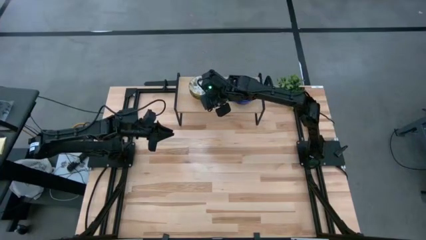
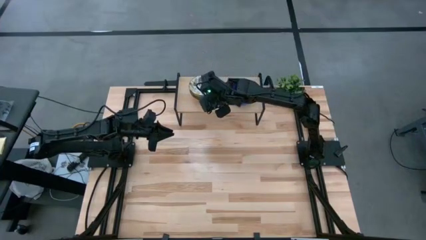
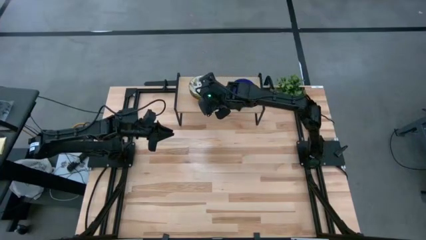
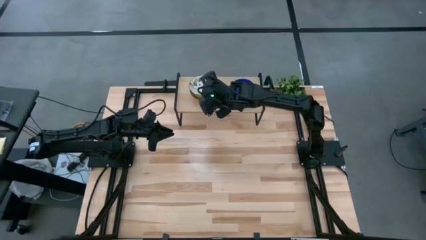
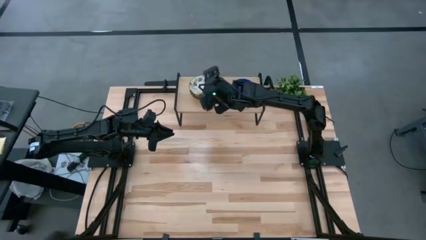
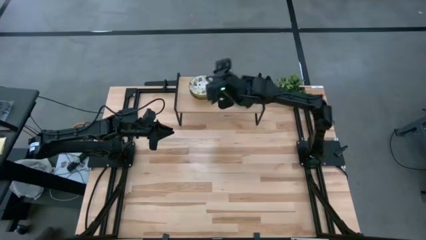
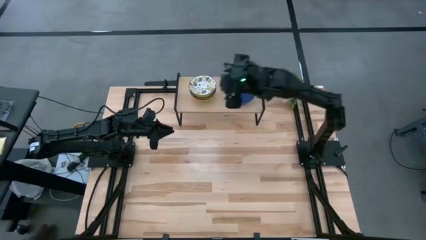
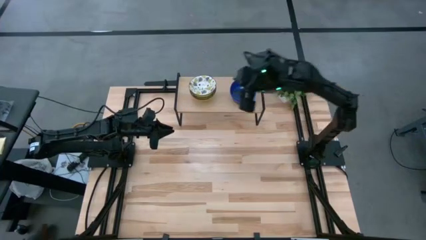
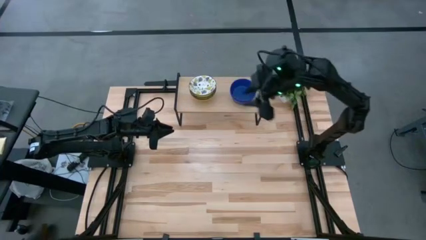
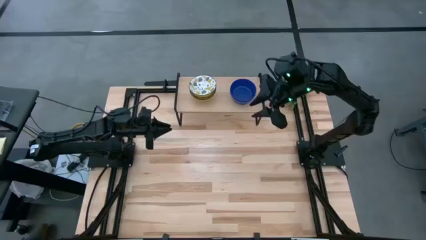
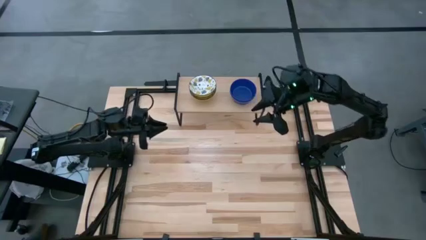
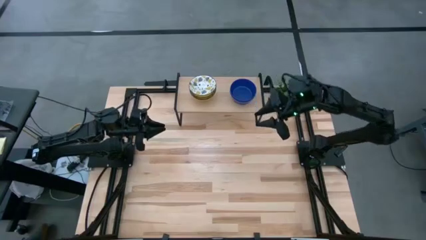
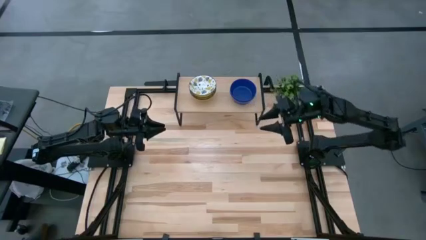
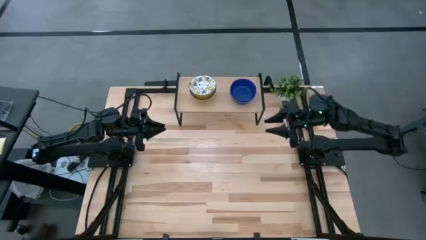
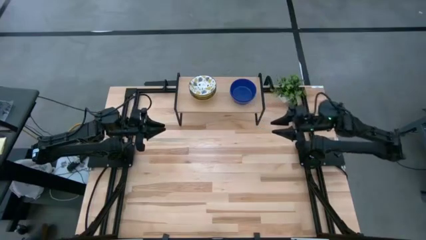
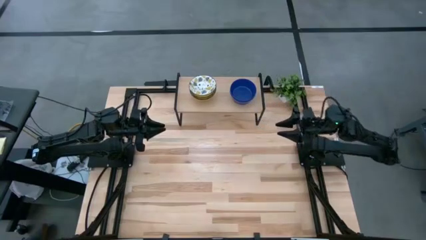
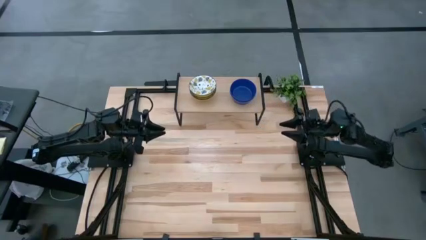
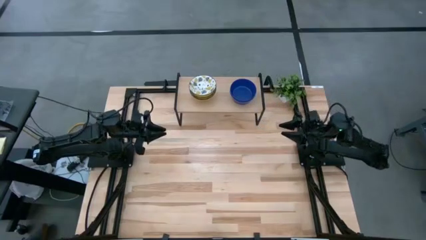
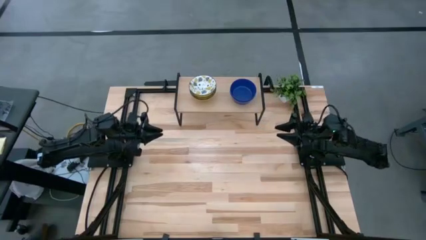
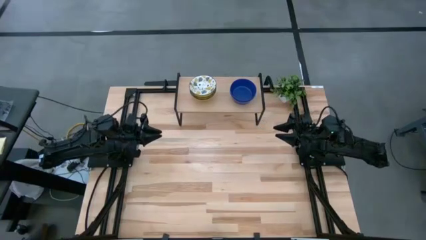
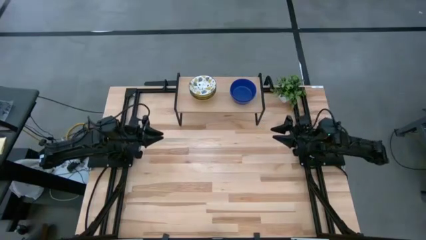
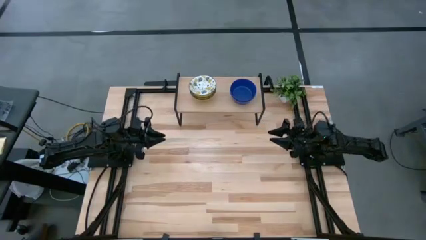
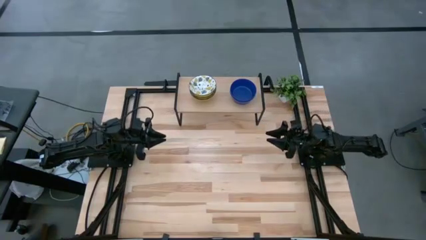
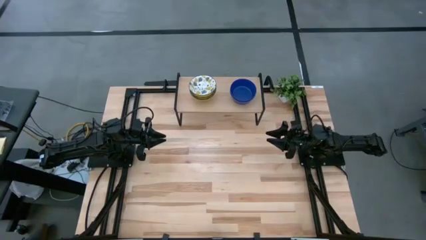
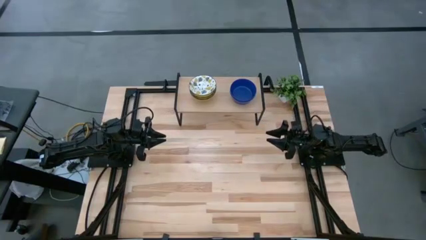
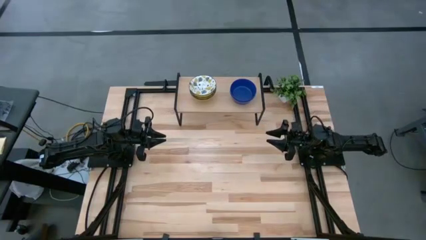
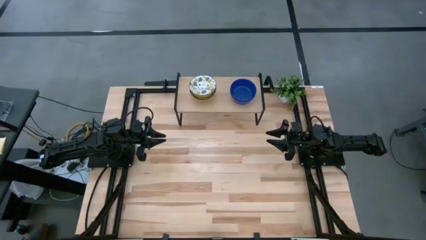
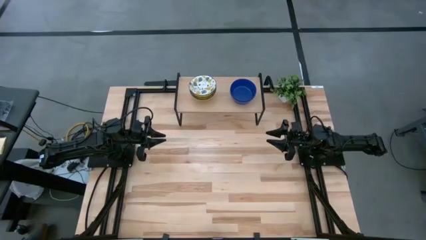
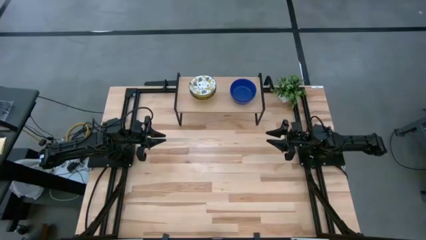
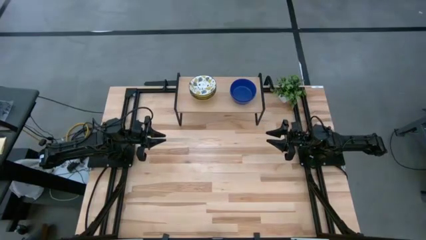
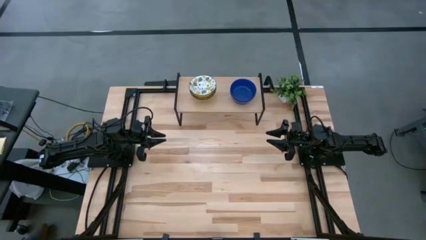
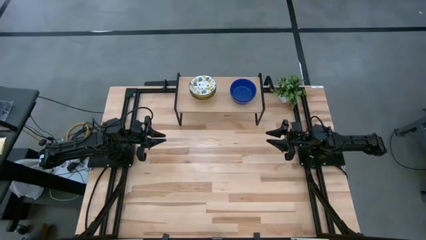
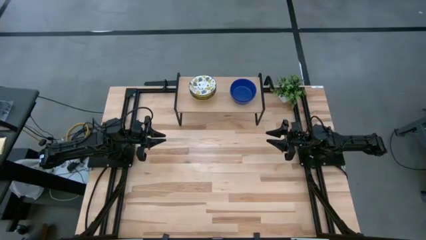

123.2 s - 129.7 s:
Task: Pick & Place Mini bowls
Return to Home Position

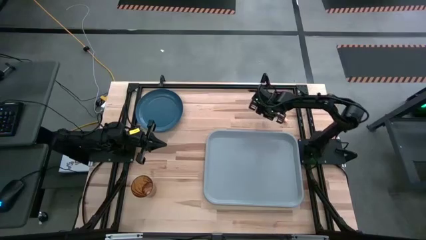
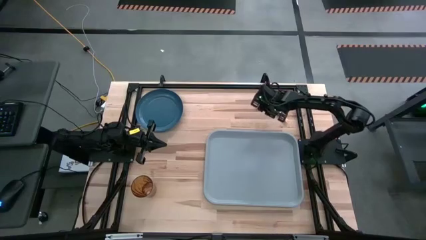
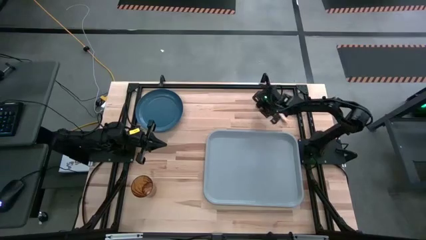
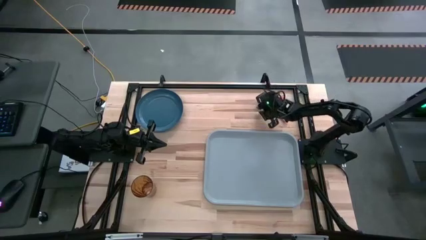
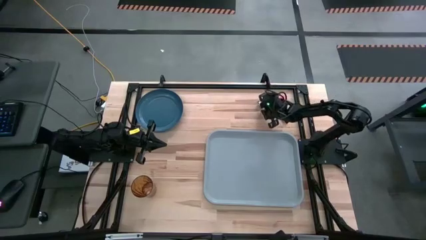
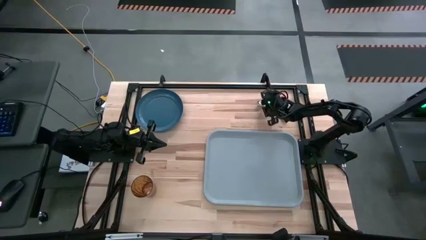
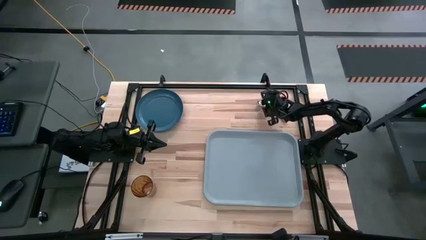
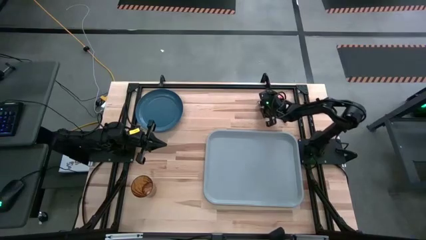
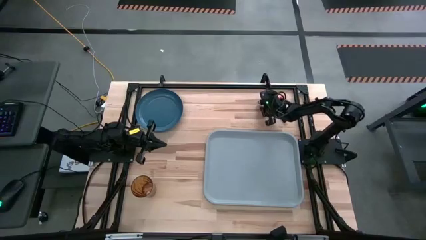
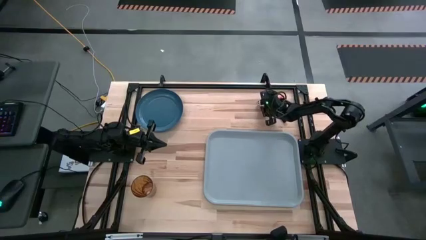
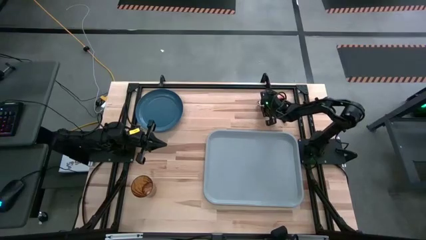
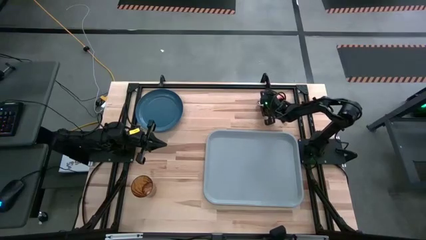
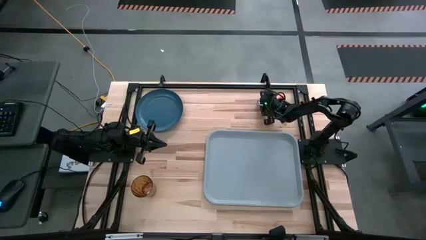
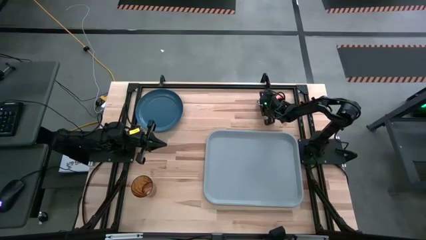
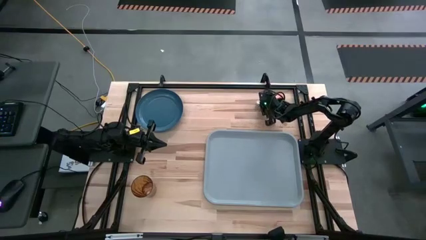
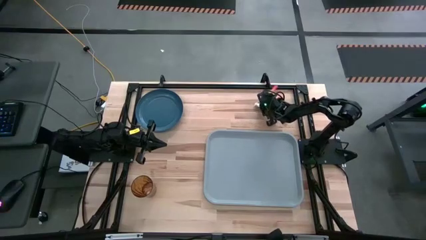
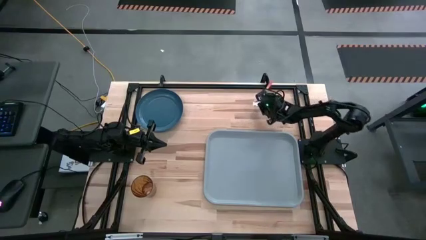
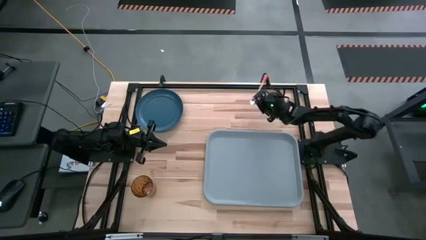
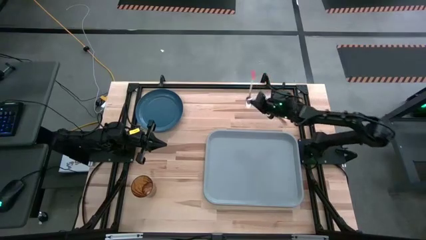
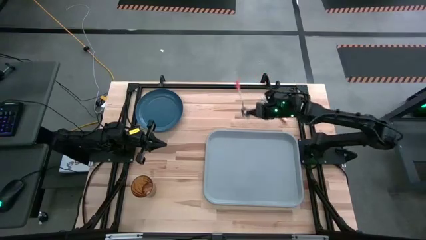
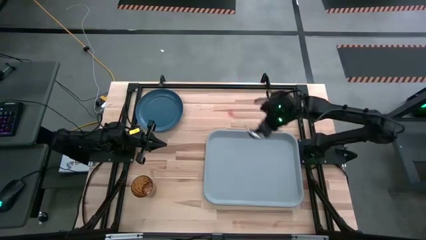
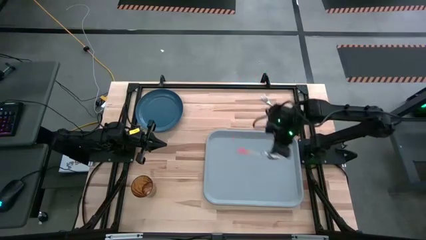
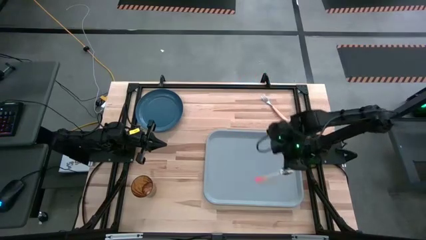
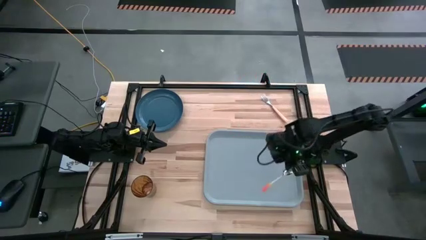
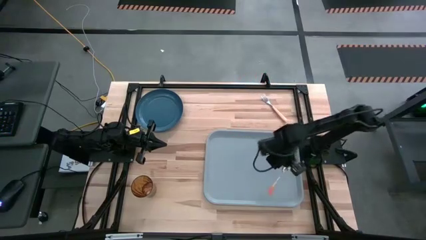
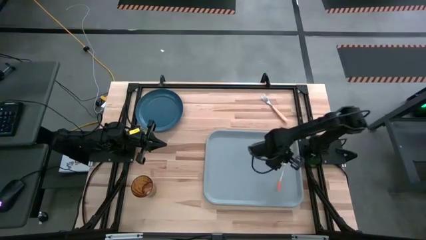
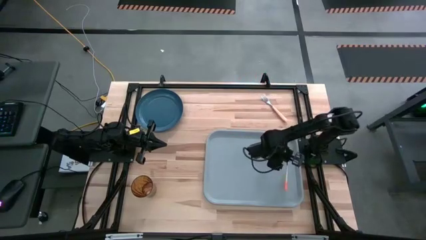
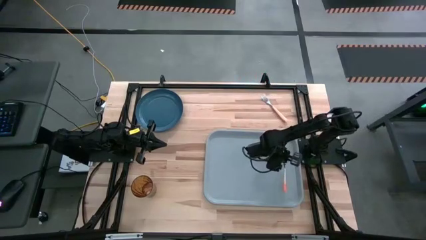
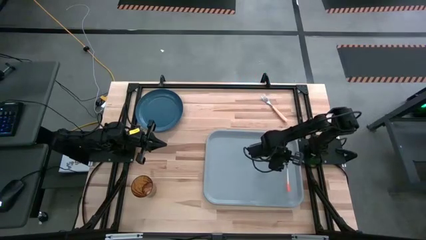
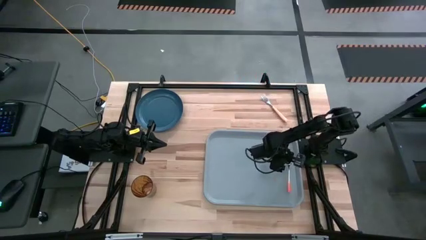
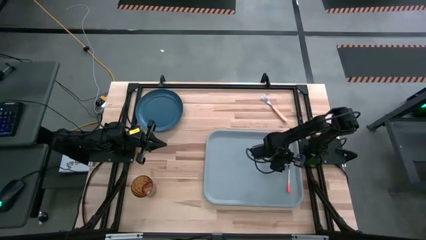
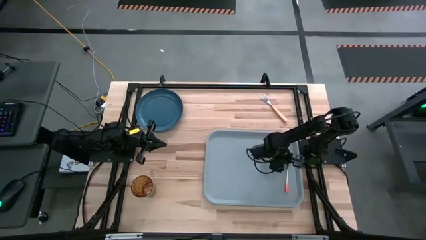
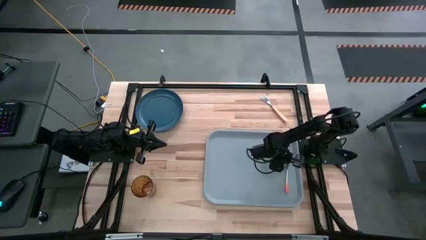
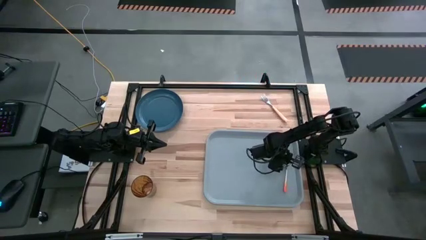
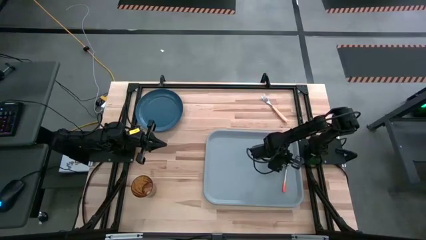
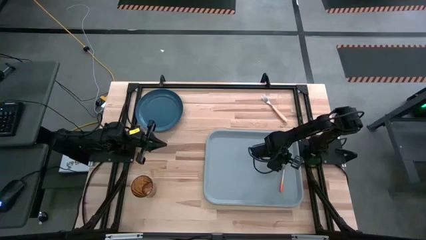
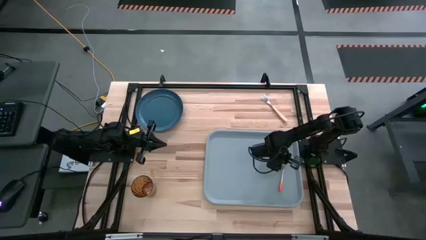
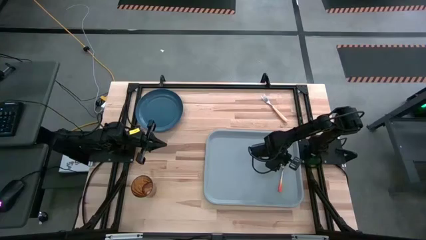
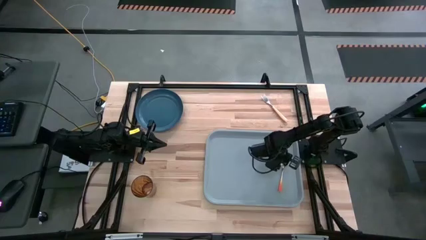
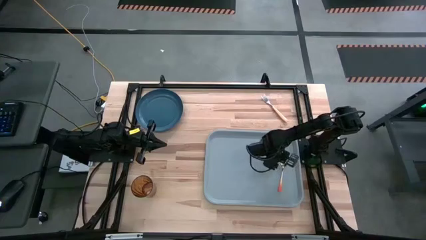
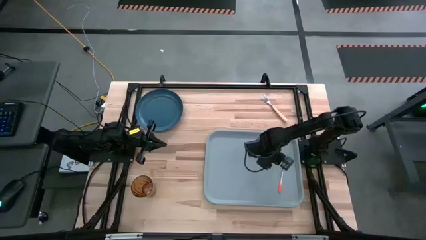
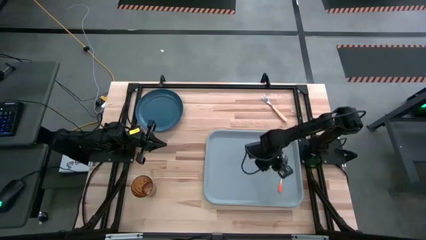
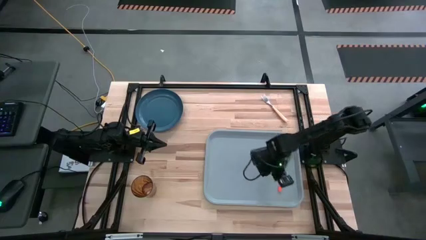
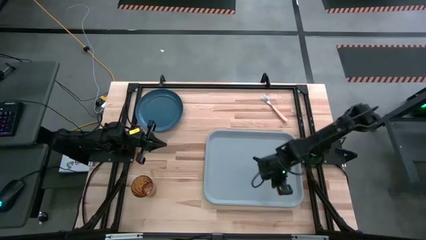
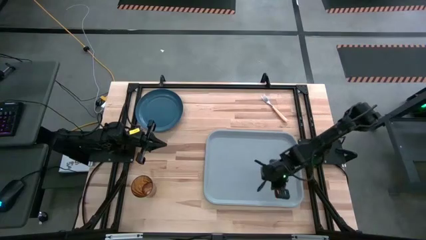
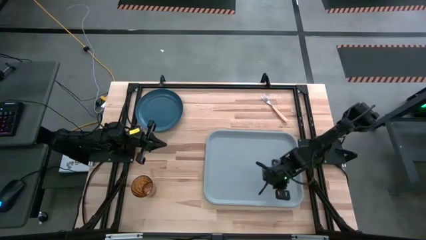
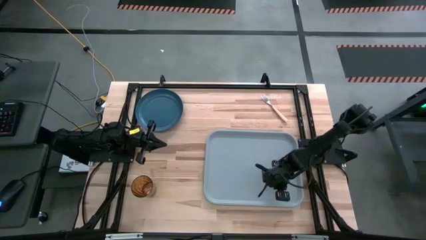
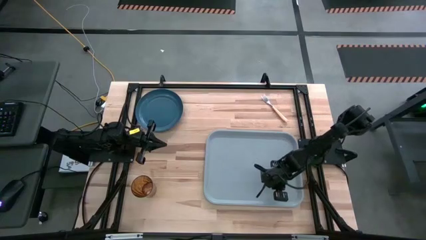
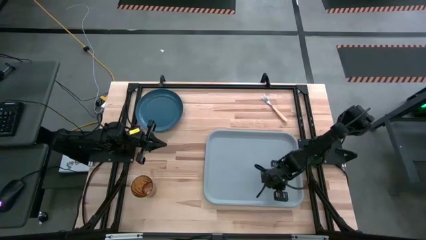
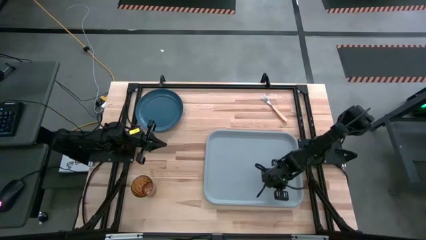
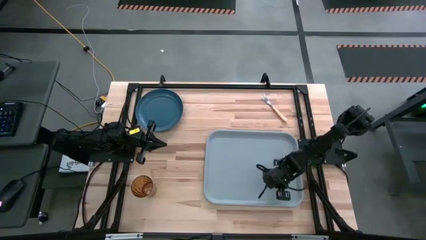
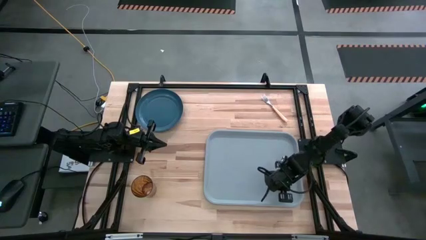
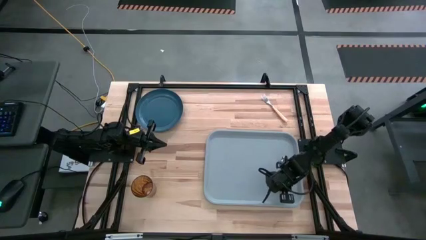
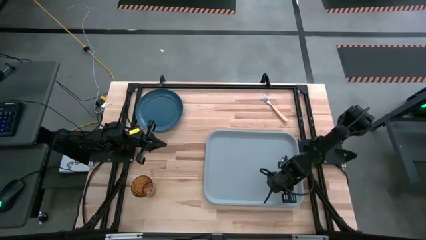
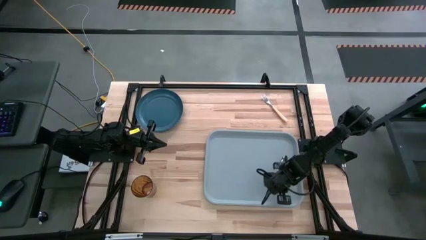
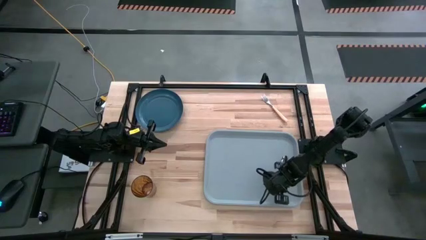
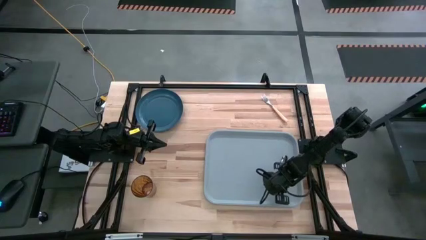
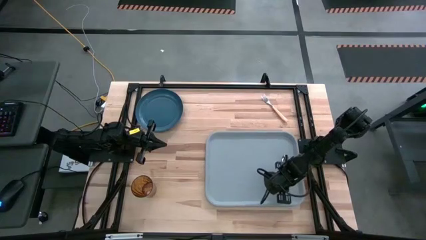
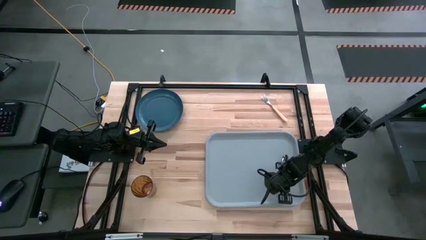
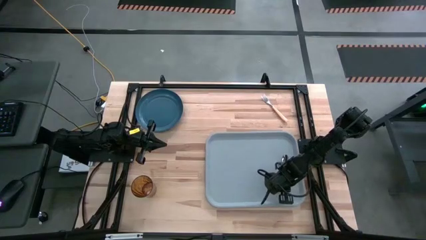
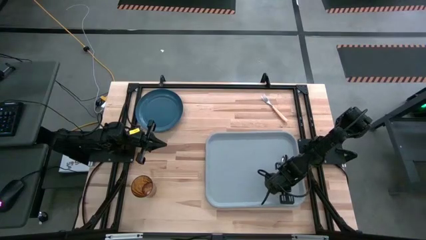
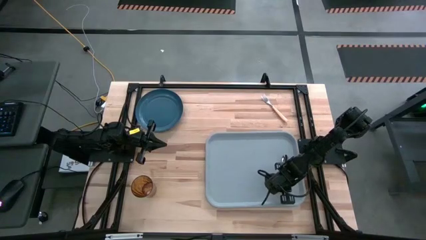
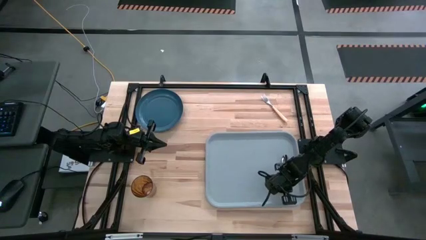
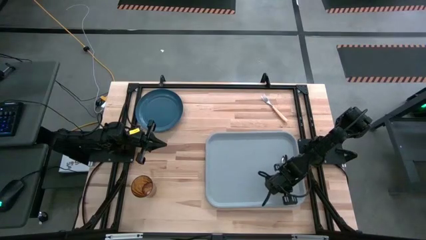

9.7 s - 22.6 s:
Task: Pick and place plate/cup/fork/spoon on tray
Put the orange spoon on the gray tray
